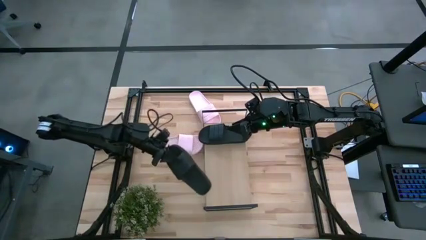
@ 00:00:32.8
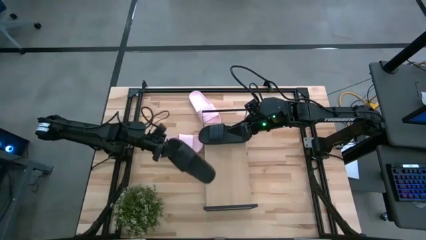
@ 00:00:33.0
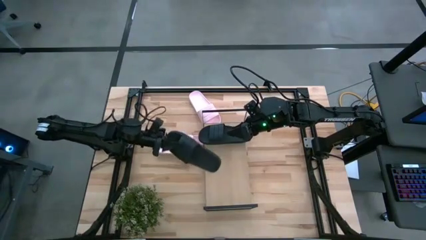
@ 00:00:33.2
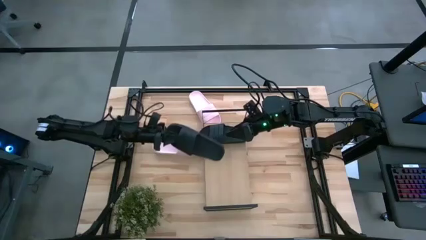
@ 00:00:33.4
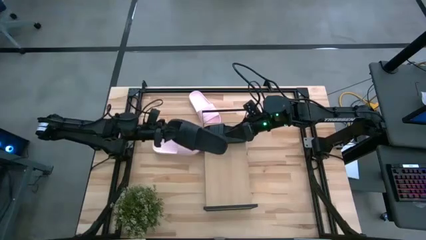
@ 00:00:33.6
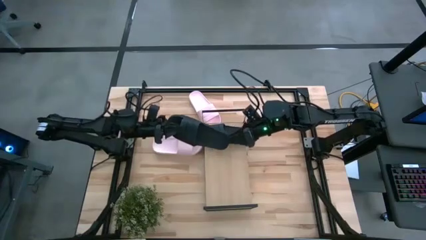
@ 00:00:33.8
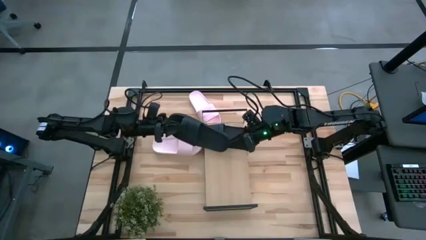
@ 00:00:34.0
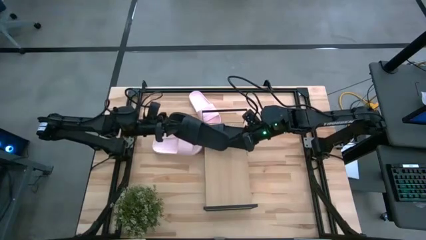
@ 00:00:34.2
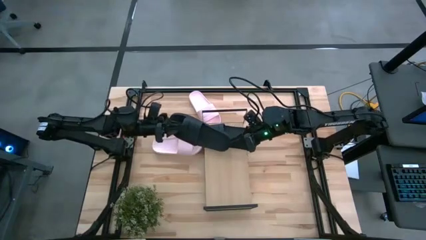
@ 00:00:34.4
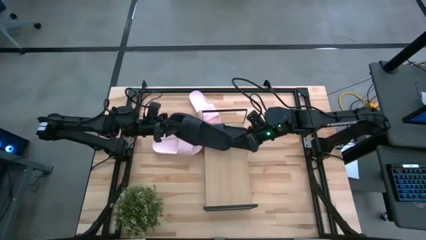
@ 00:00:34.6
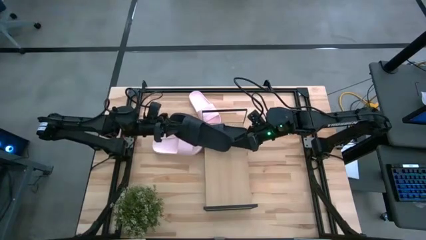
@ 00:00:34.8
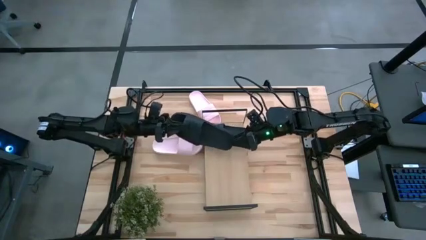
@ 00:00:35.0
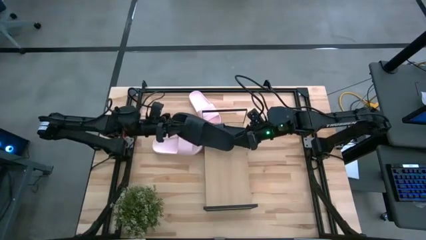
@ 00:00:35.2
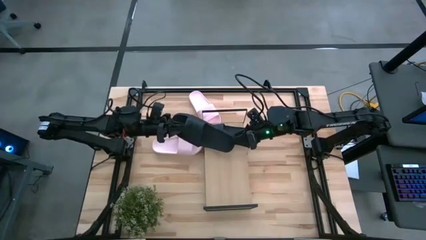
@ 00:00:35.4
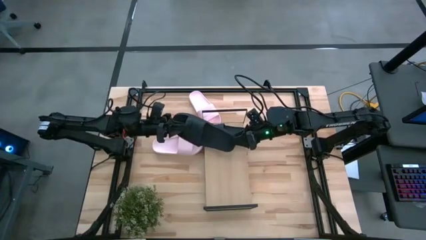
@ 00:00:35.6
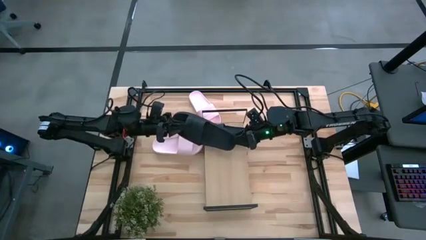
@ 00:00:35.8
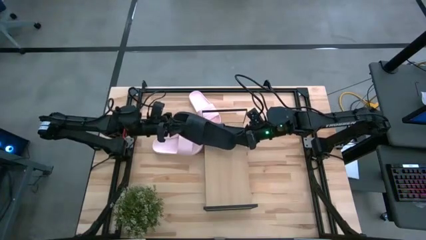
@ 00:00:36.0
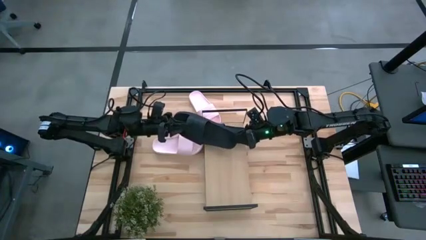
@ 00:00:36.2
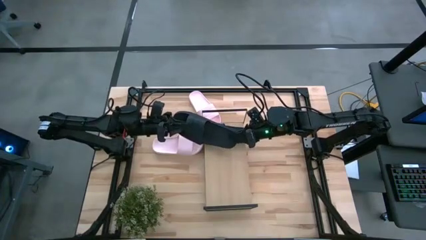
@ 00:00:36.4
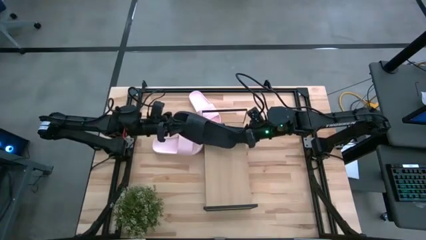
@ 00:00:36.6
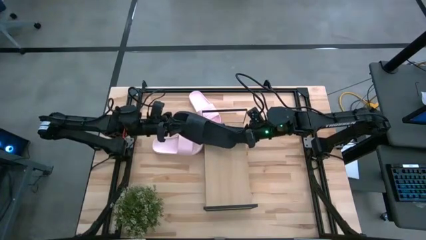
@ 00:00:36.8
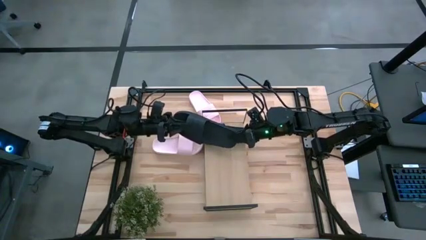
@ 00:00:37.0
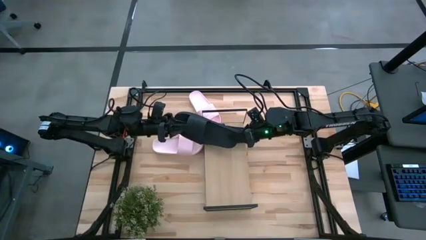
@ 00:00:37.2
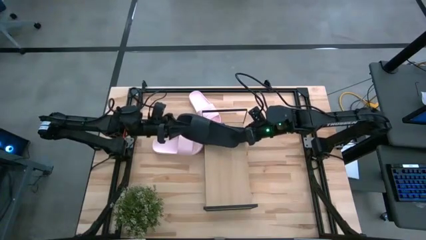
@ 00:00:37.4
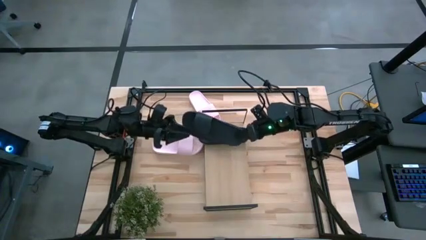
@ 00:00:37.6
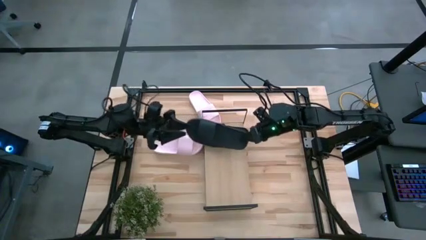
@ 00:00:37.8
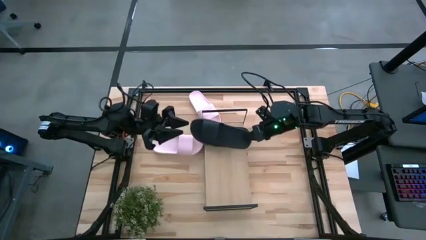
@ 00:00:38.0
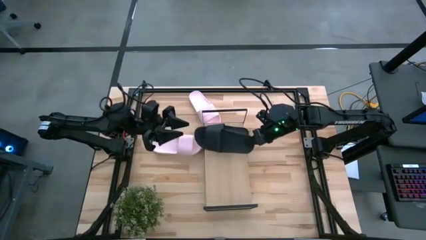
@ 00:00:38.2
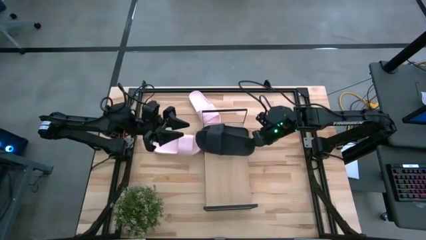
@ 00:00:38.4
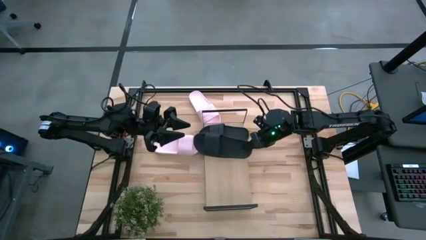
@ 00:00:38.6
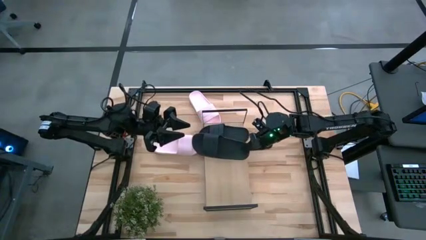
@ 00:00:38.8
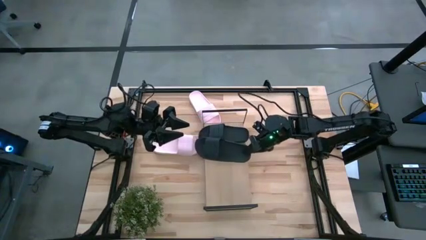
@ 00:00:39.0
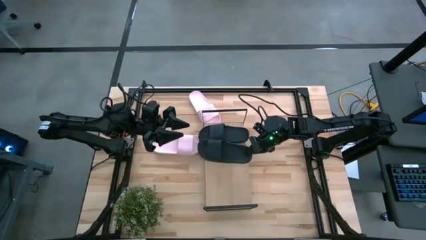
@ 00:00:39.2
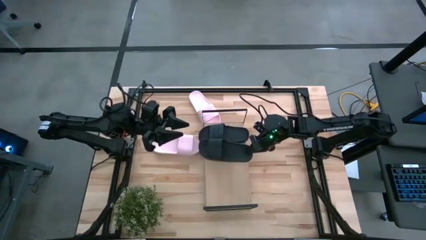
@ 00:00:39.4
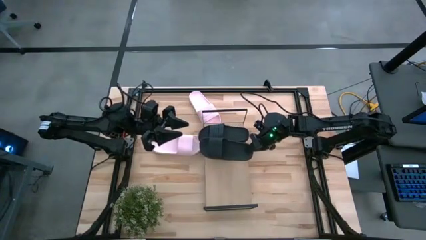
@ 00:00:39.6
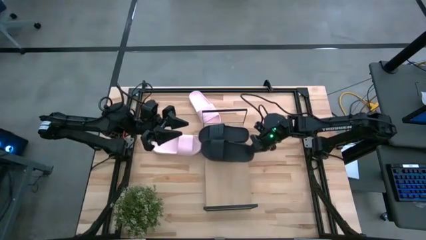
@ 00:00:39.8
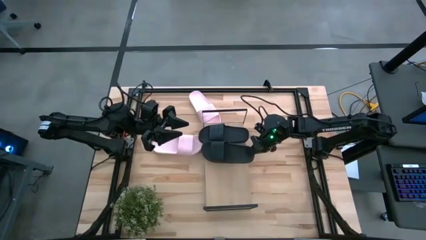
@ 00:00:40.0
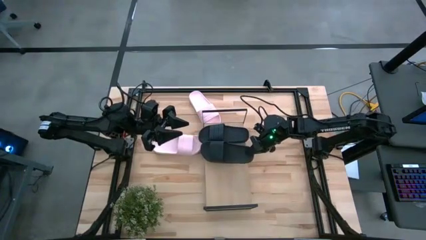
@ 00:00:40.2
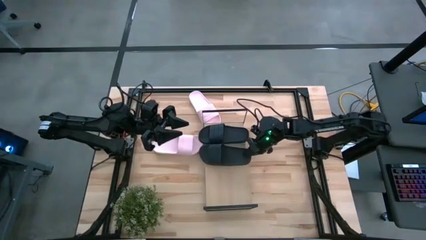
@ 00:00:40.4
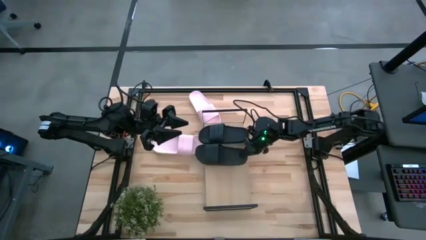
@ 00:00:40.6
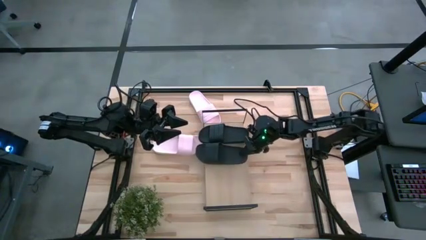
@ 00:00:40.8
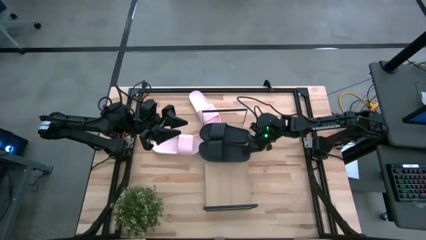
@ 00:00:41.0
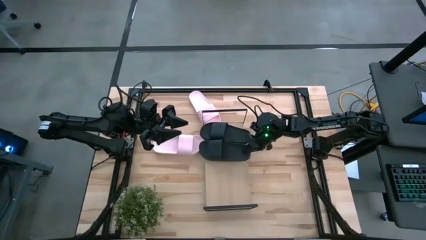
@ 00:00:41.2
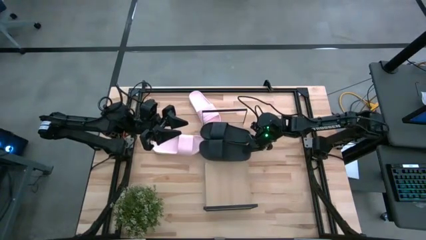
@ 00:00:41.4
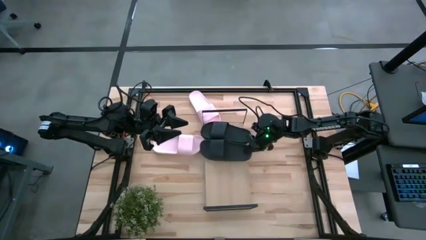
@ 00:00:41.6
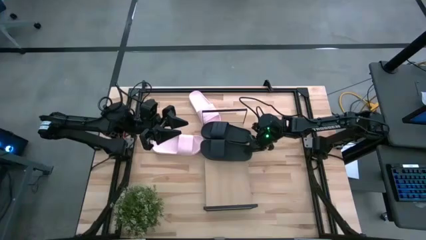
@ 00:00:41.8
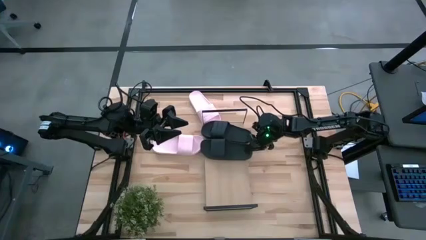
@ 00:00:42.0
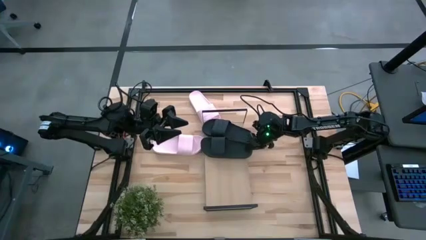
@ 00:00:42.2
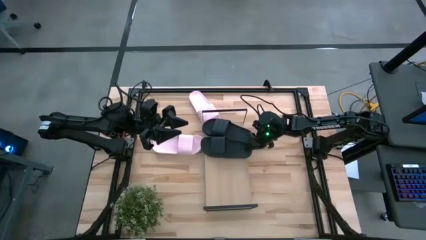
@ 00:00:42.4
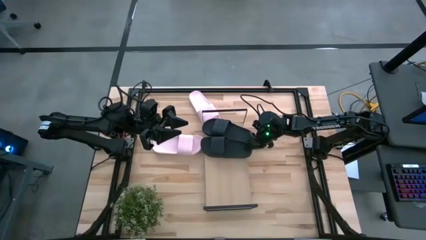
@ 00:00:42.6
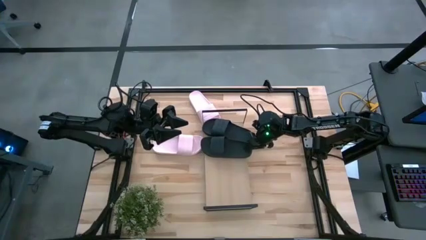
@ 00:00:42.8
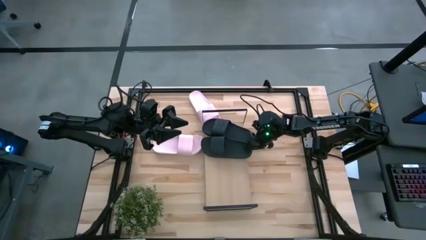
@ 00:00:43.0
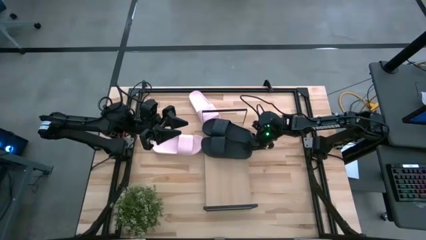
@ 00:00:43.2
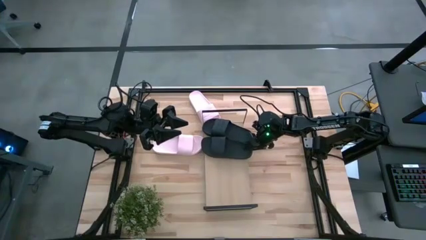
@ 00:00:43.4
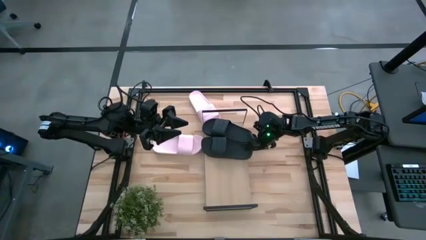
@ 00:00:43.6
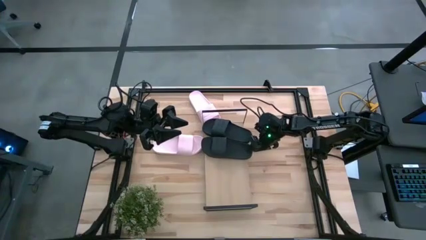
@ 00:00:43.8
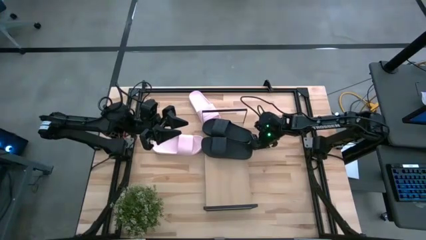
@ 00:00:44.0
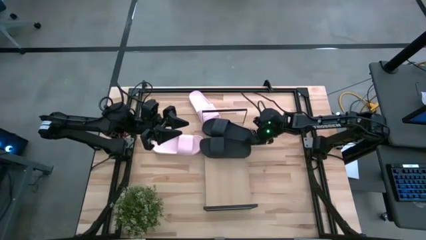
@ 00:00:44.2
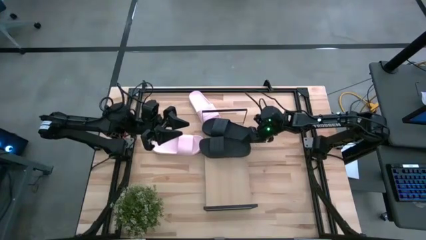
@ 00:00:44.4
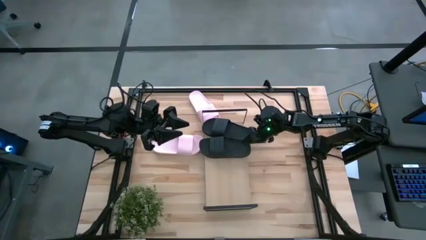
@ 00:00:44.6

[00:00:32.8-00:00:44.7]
Task: Pick and place slides into the shelf
Put the black slide on the shelf
